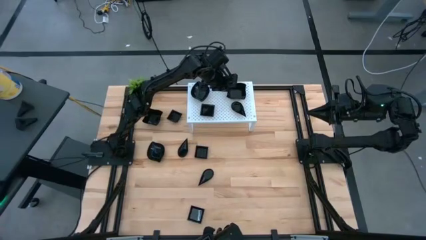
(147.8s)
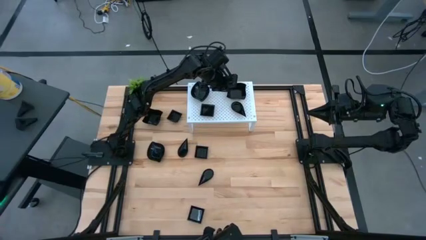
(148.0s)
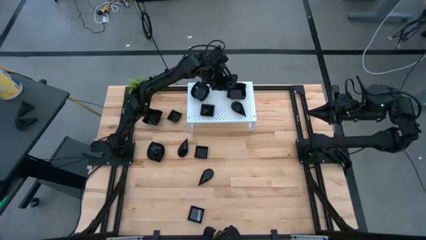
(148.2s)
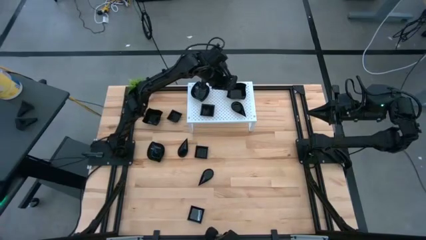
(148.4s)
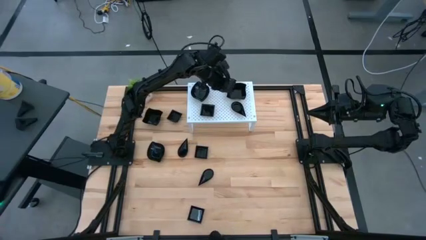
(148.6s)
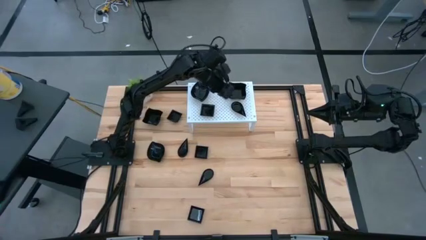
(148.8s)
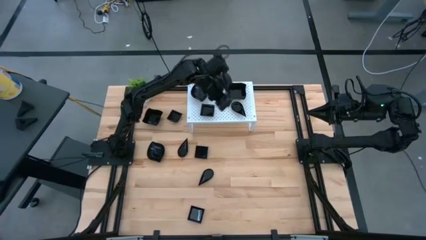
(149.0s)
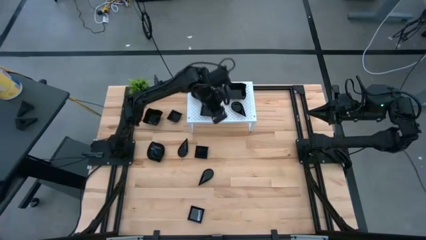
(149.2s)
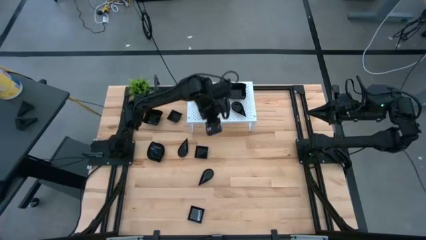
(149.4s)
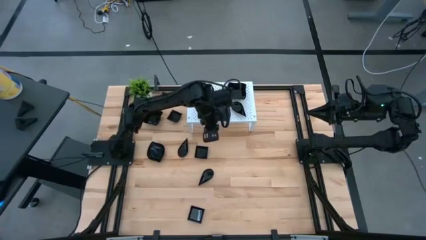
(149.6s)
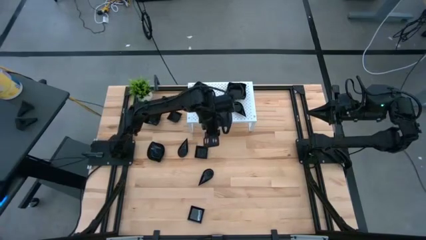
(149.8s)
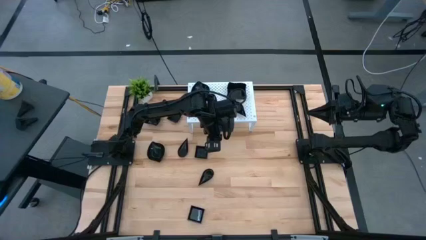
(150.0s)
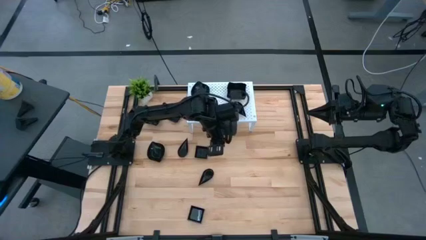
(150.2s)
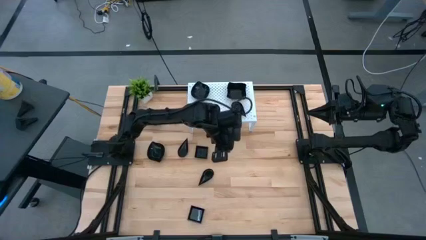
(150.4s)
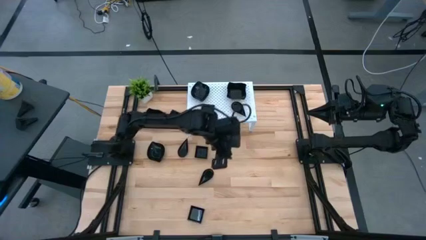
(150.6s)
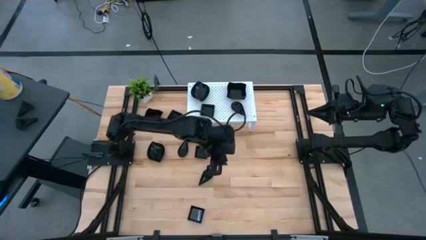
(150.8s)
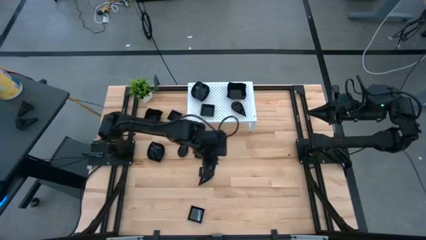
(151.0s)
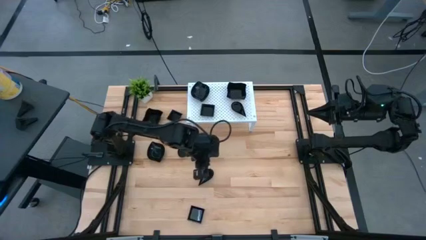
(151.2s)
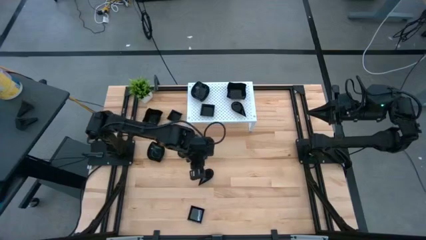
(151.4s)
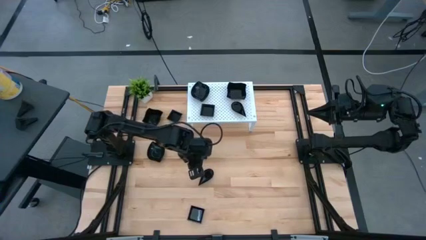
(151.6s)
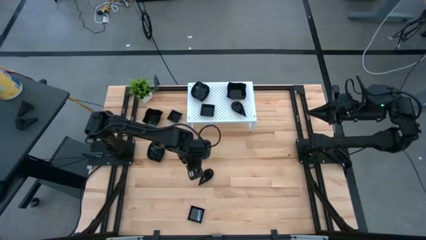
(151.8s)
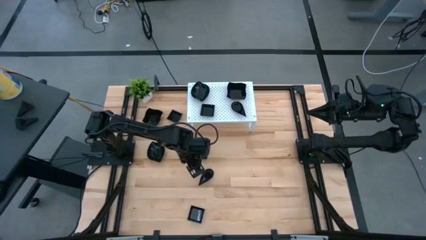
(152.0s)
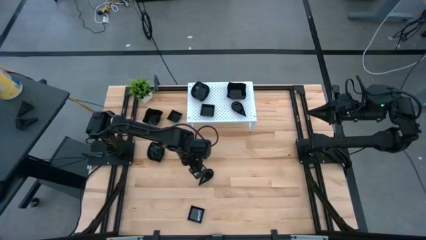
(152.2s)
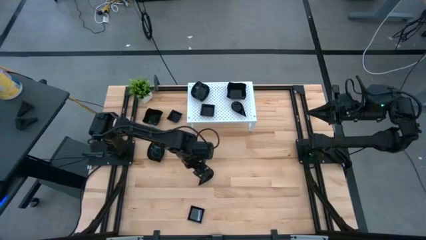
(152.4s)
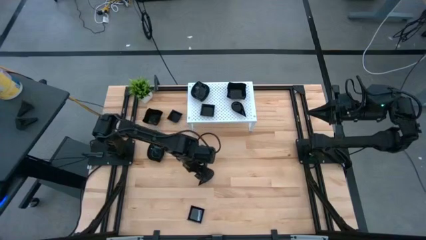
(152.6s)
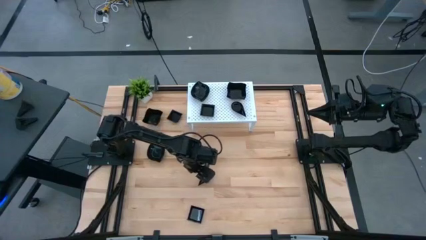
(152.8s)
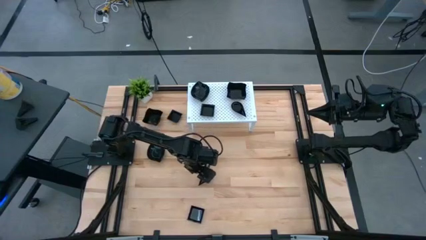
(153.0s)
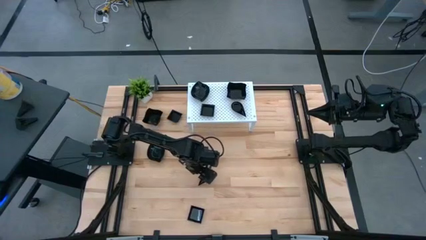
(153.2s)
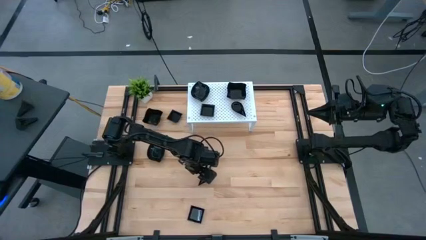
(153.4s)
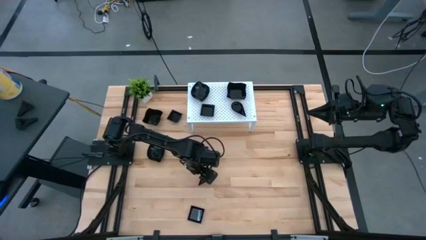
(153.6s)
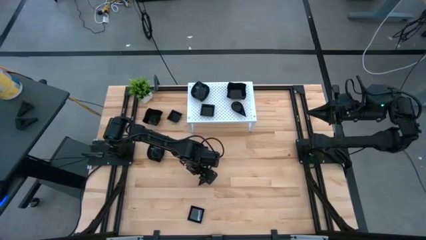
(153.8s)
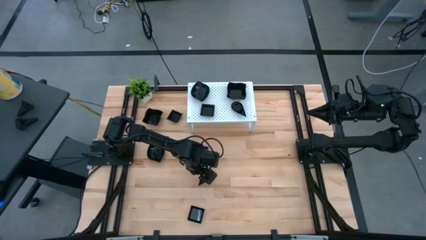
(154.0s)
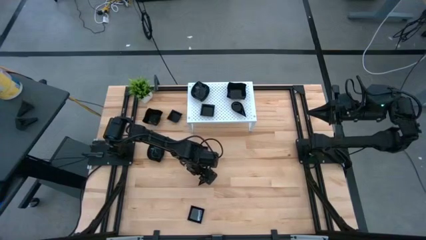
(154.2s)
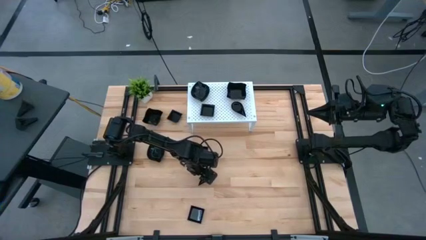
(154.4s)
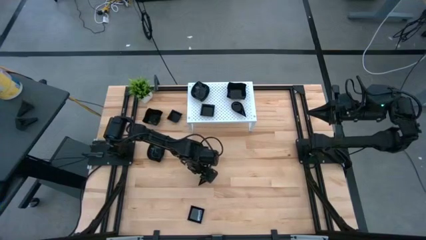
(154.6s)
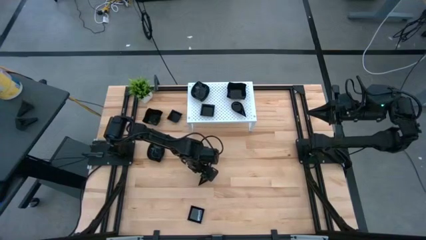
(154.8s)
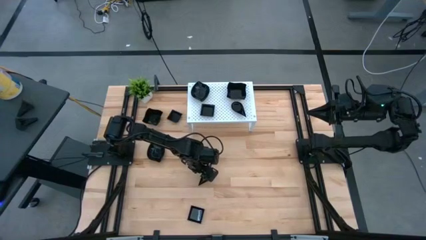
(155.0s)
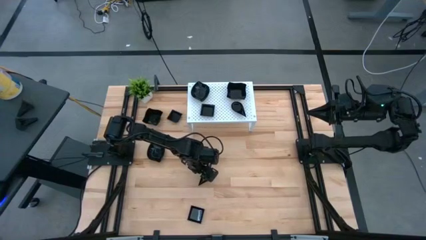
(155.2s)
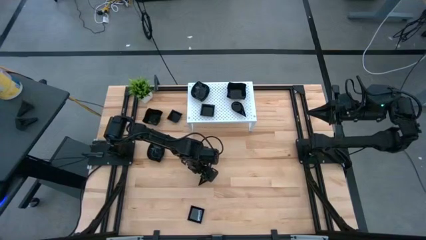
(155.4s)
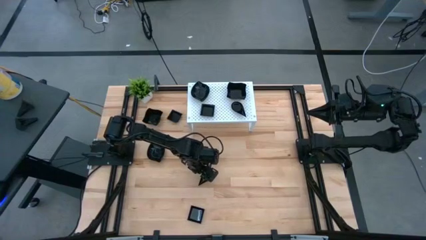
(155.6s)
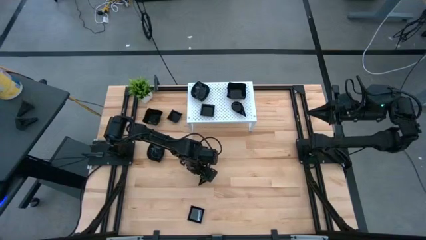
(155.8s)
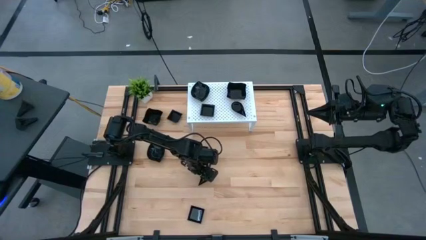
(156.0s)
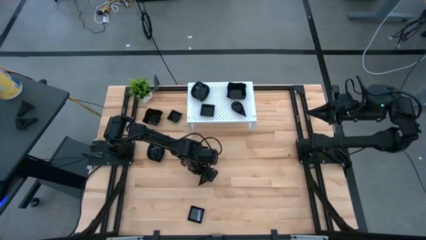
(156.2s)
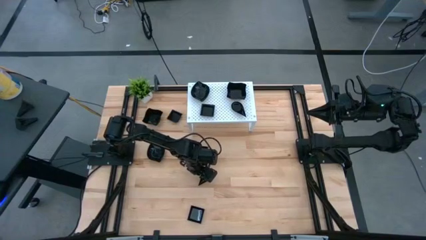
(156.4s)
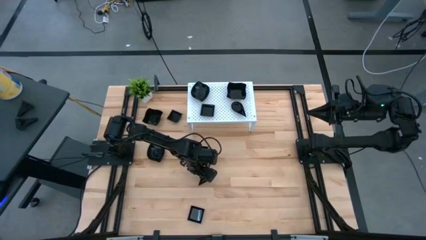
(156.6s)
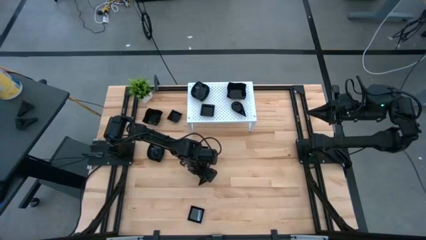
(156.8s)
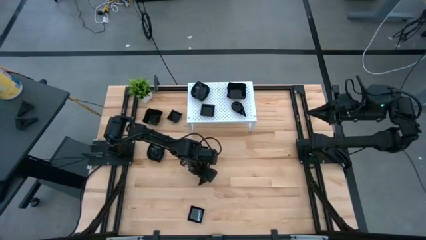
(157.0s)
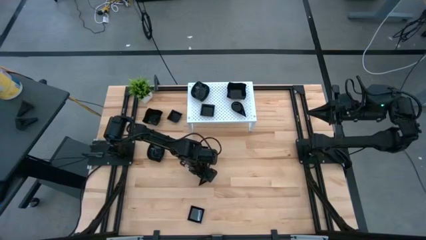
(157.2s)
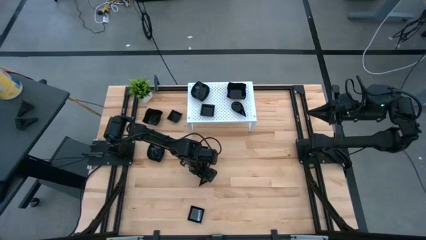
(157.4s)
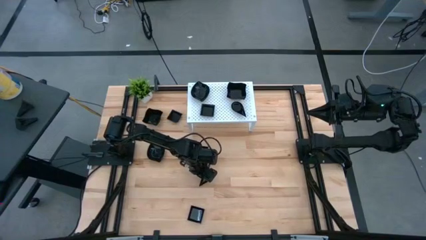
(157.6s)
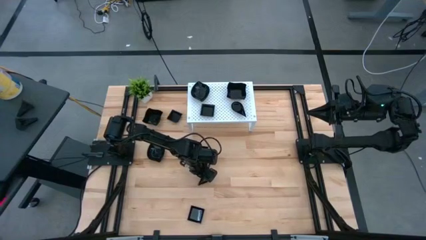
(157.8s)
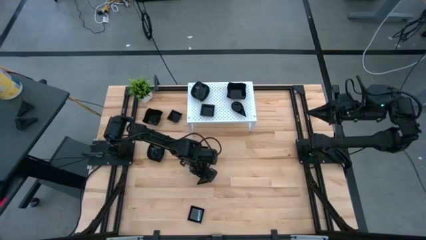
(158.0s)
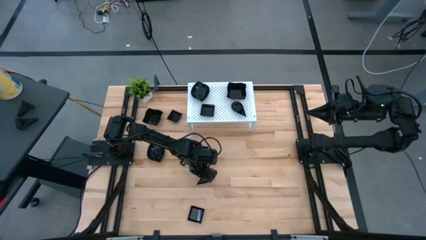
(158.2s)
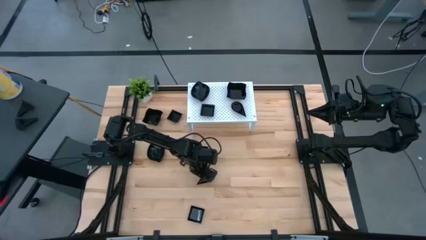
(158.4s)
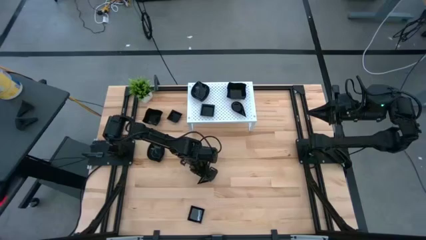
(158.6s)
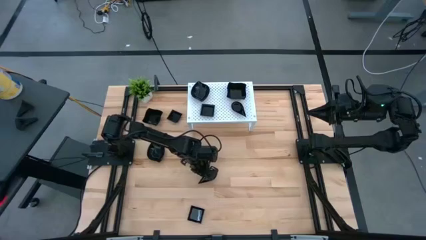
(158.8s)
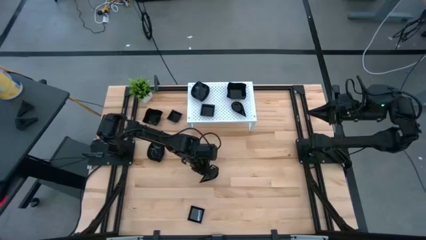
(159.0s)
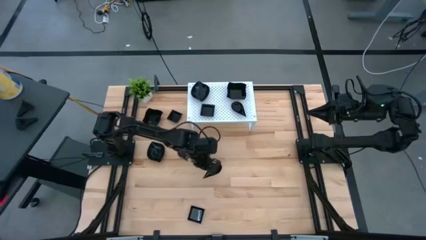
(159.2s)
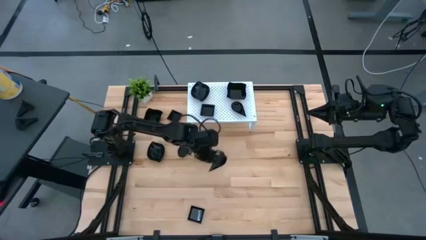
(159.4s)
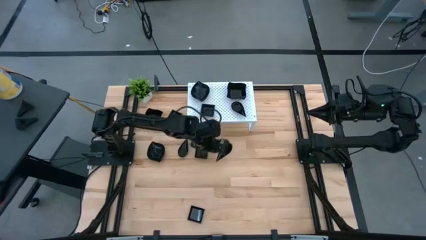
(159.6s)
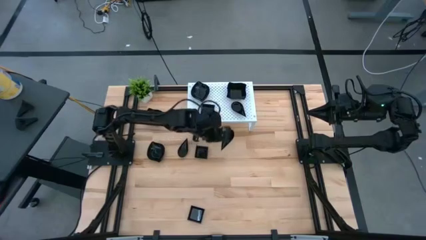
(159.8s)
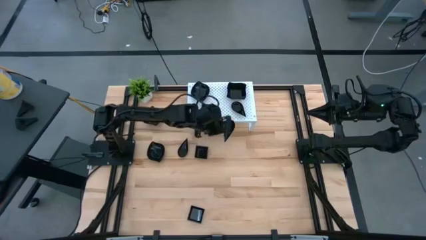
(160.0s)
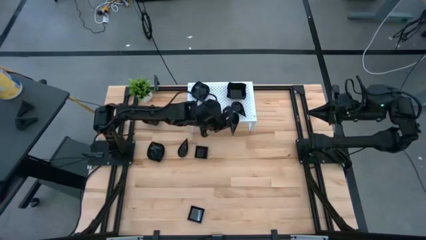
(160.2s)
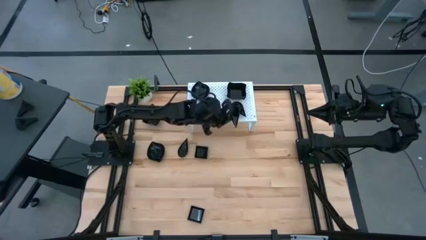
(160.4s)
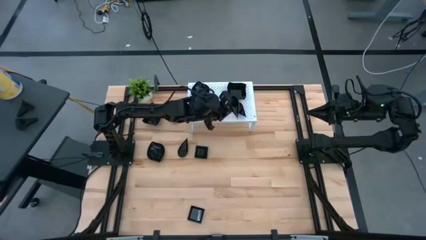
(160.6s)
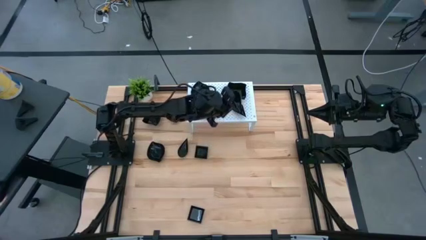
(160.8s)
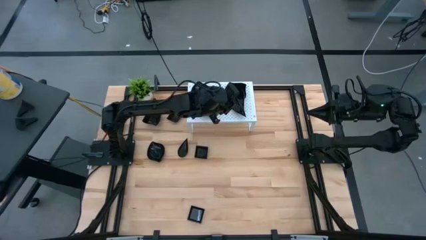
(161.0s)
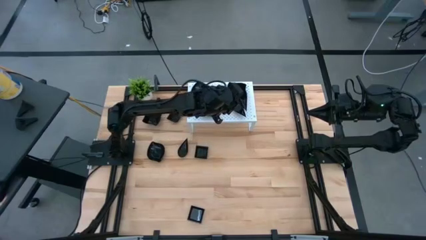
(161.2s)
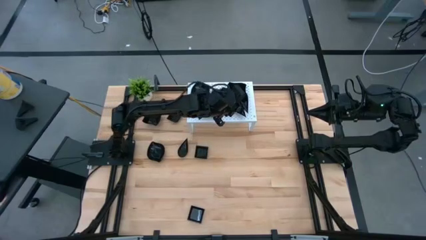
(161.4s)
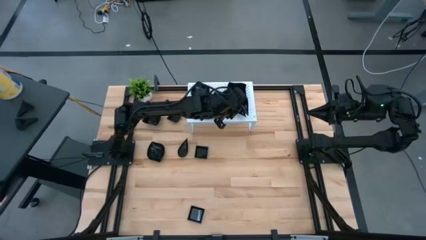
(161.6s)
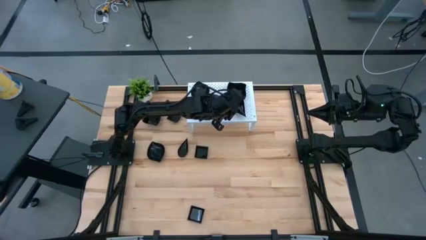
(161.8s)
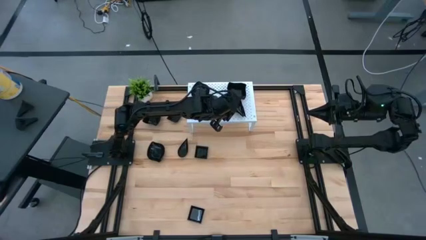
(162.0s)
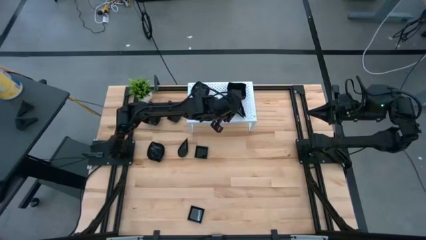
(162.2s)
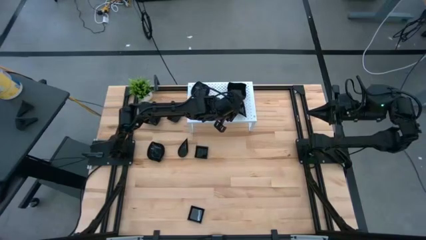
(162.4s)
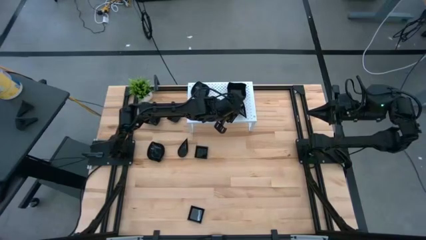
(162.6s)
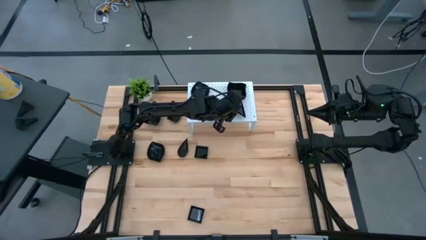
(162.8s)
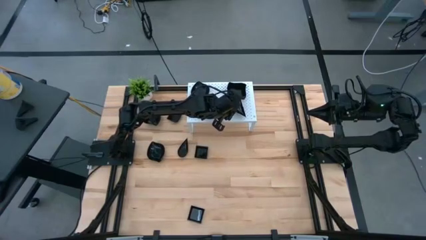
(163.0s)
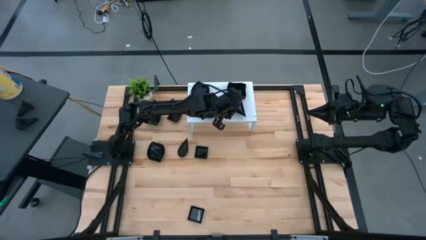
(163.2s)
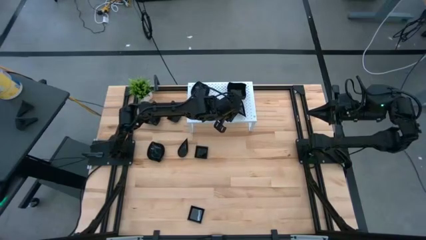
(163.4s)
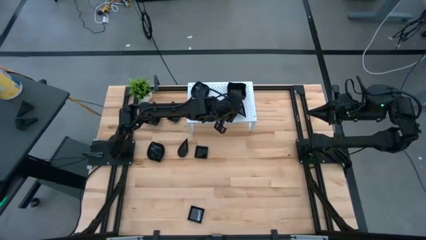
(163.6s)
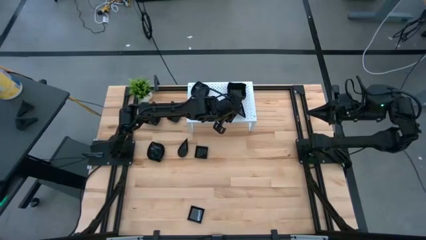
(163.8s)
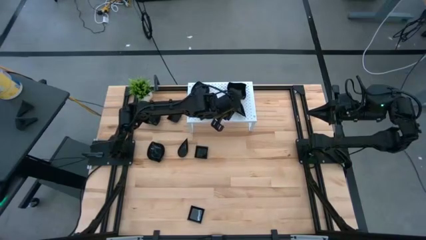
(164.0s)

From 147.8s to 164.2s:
Task: Pick & Place Mini shaped plates
Stack the drop-shaped plate on top of the drop-shaped plate on the shelf
